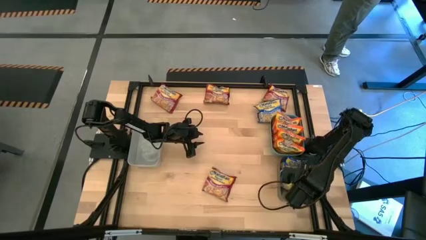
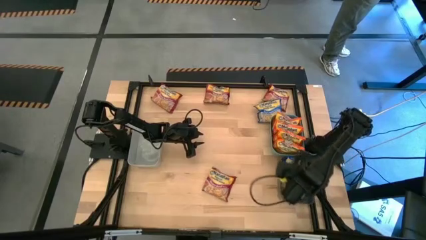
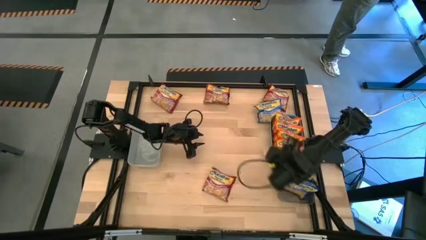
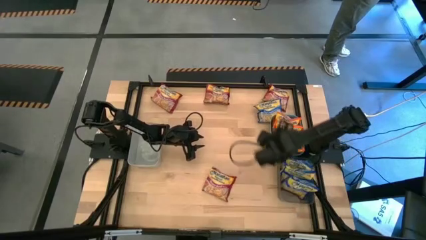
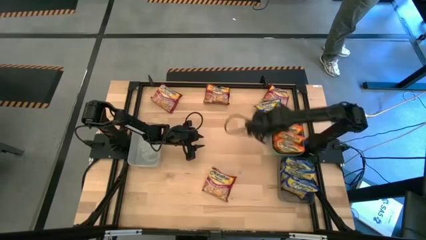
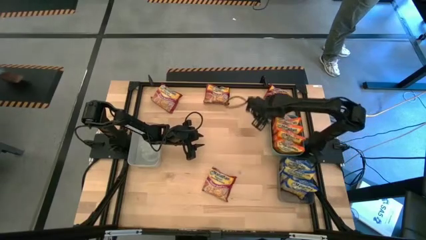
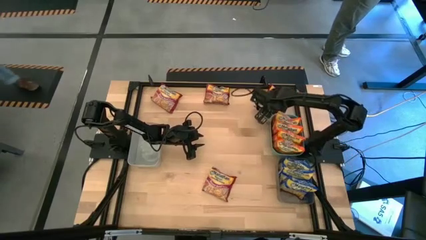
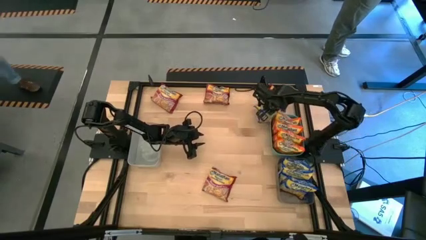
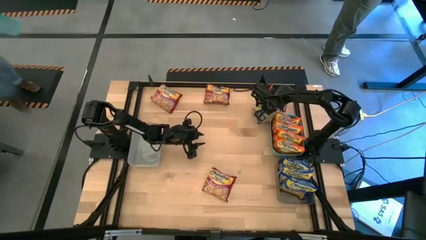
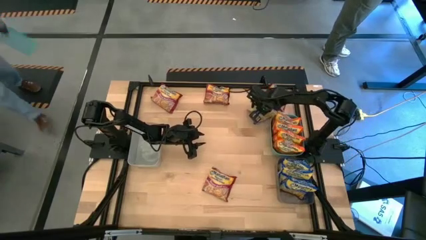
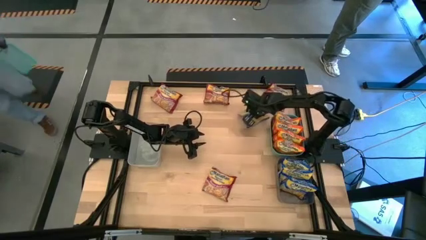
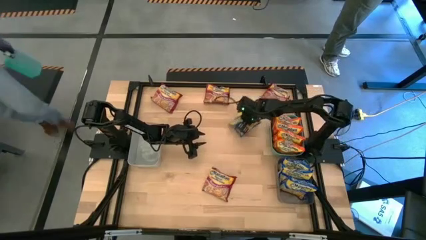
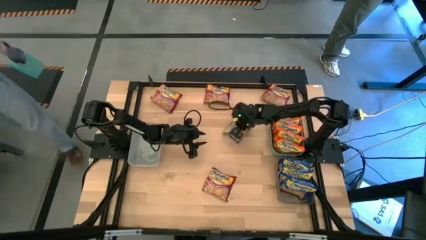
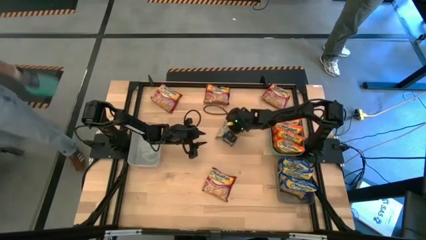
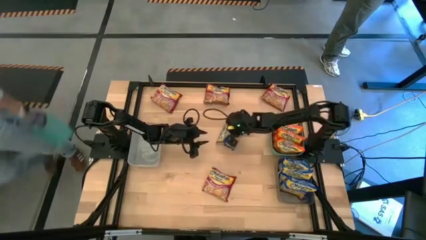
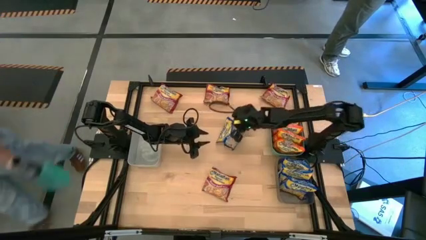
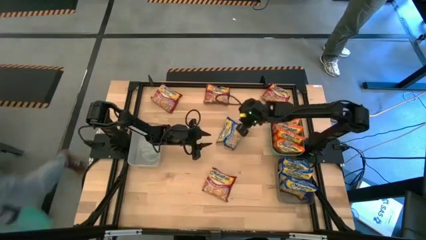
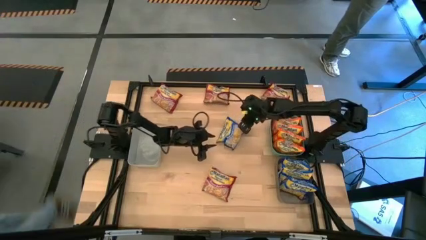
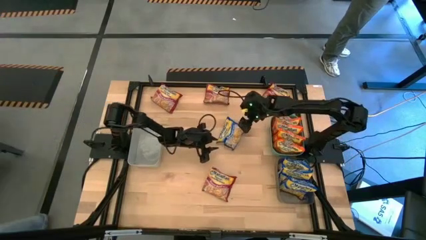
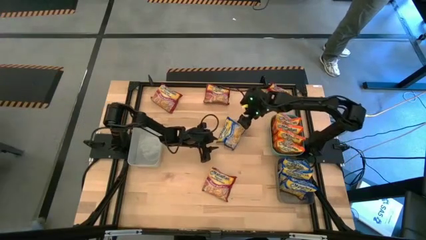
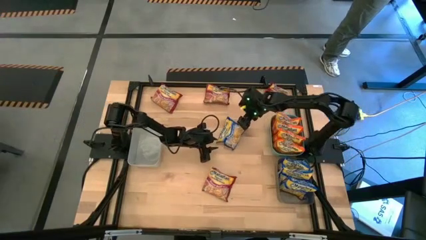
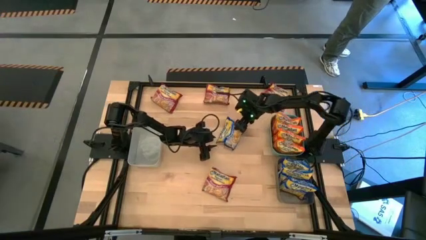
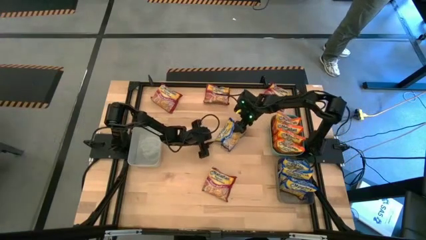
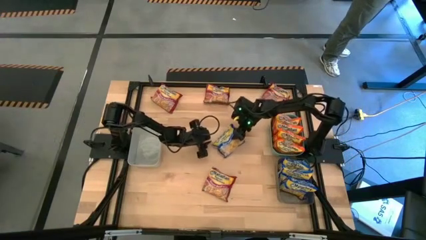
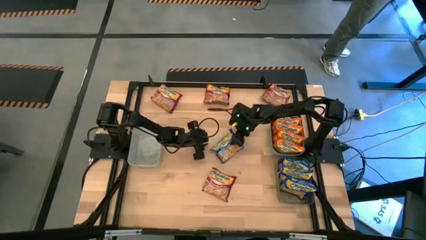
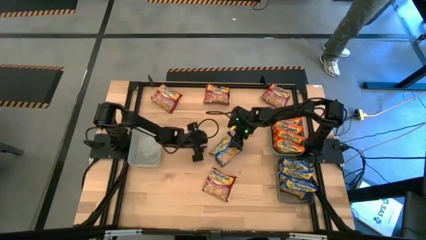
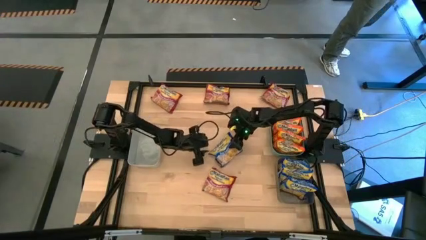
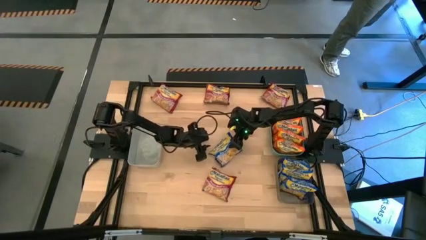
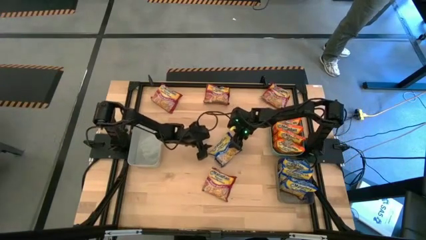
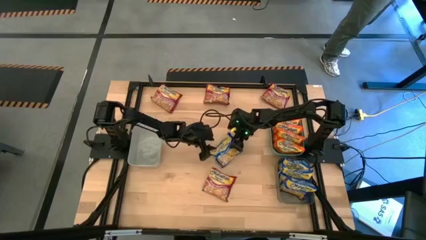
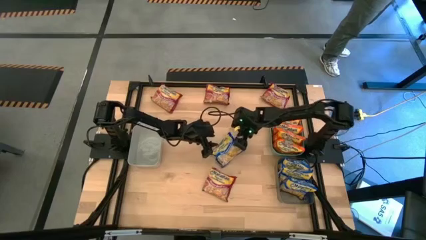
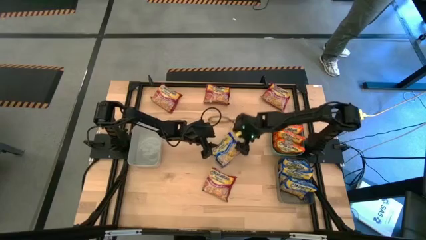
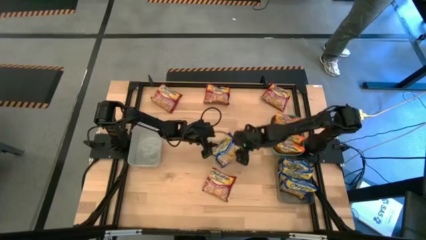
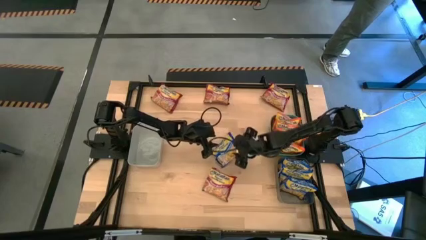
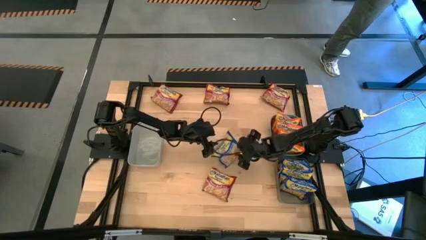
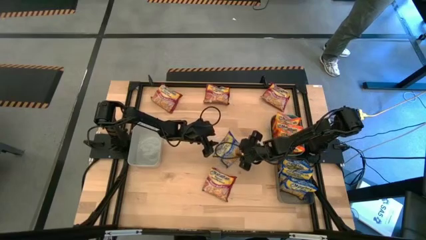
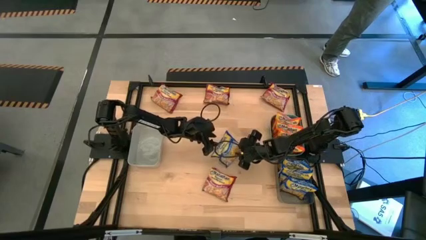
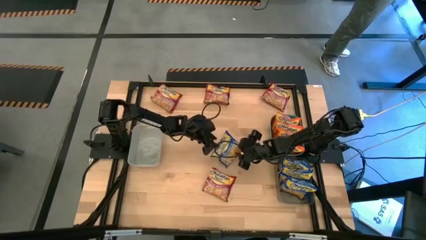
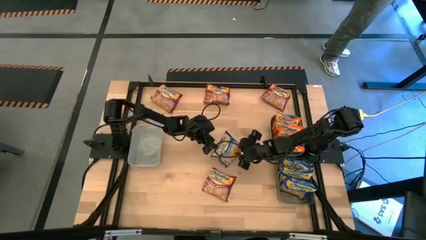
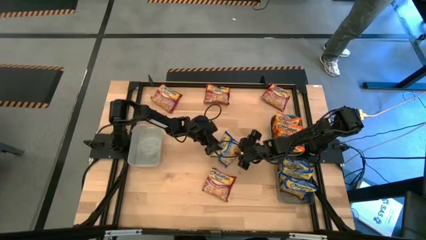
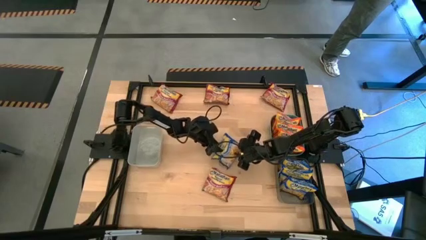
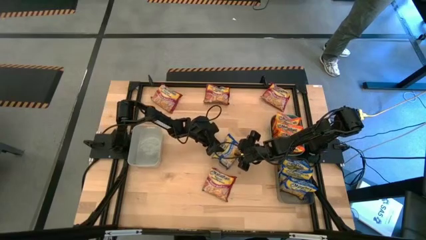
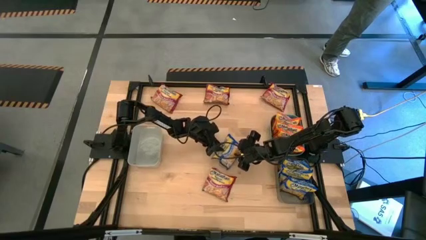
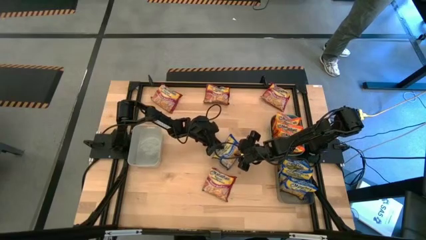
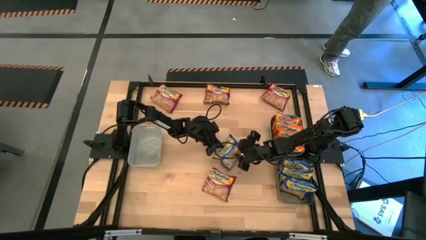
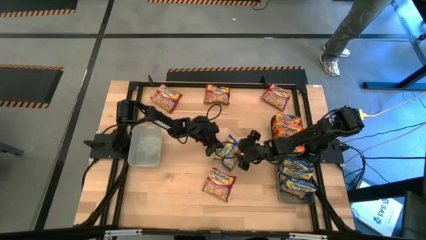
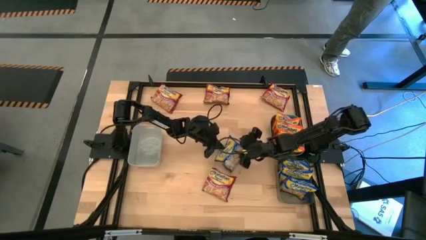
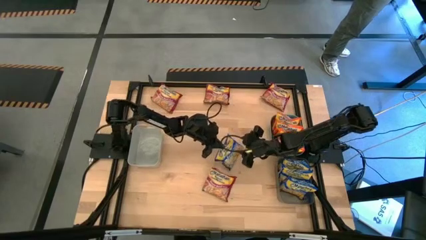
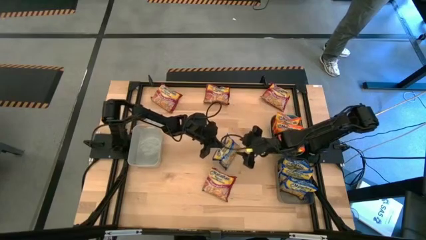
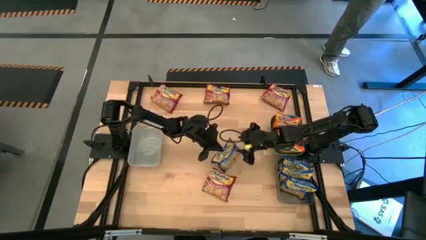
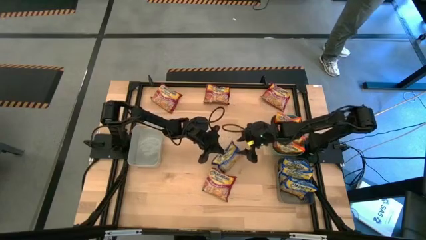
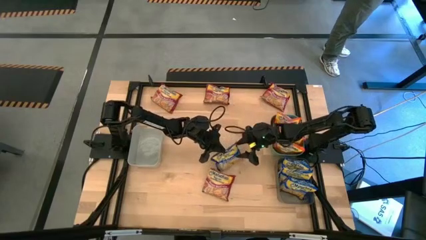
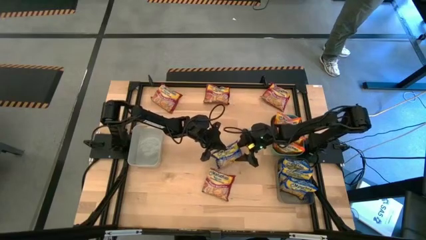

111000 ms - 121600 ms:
Task: Sort Maruchan noodles
Put the blue noodle pack into the black bin

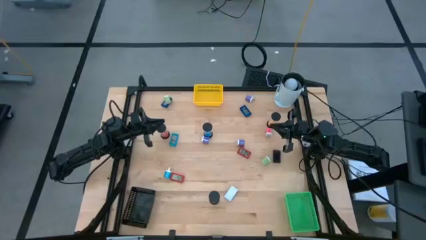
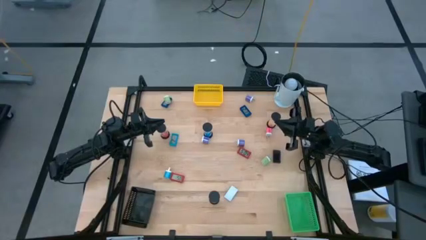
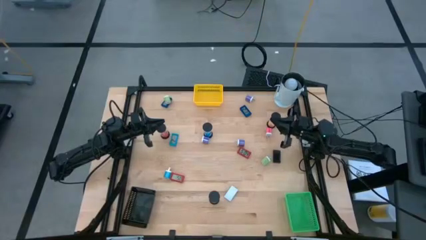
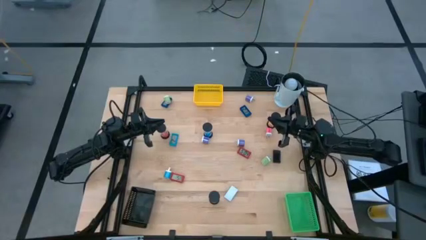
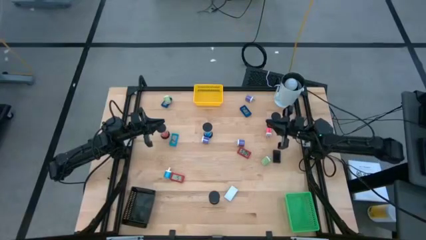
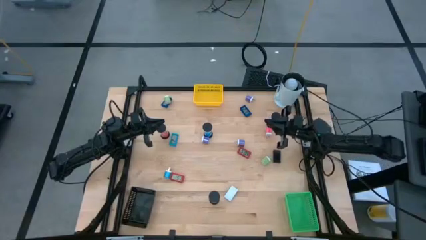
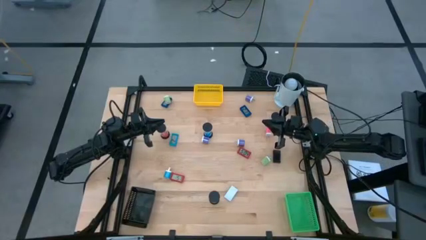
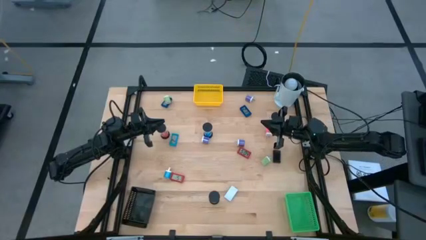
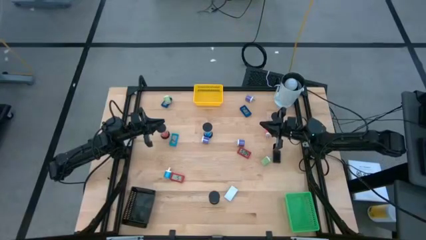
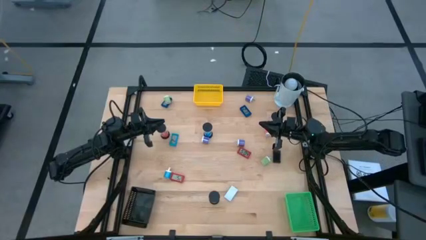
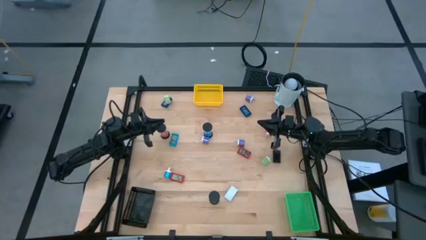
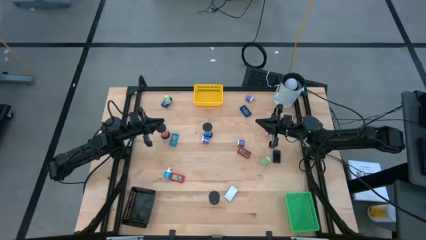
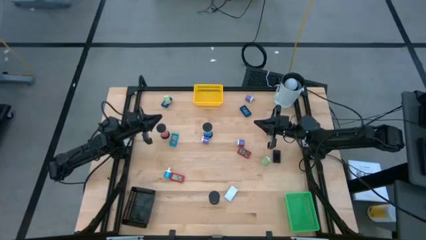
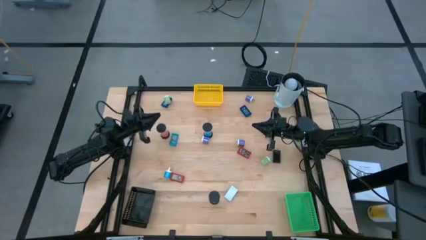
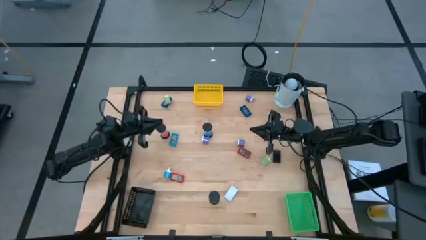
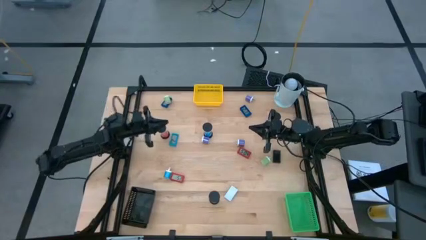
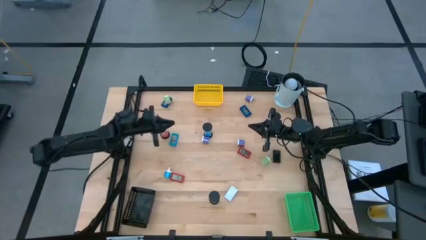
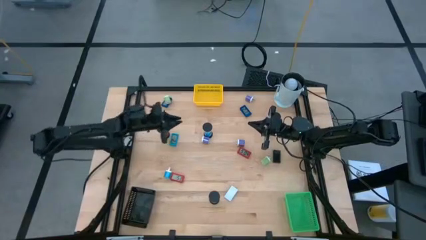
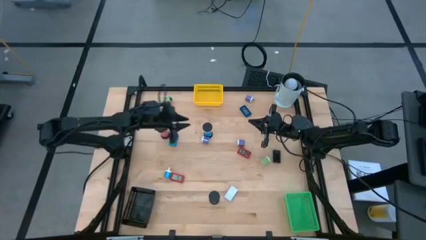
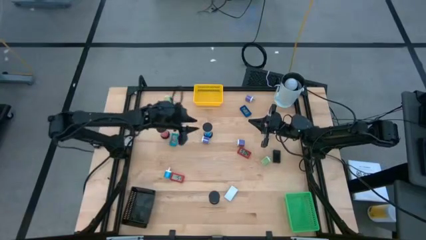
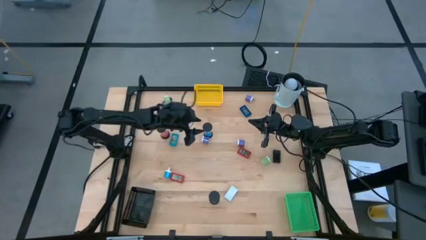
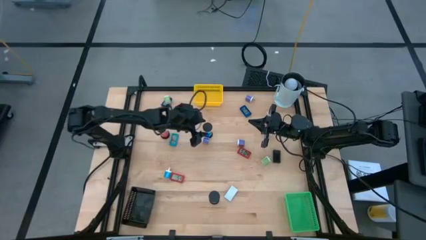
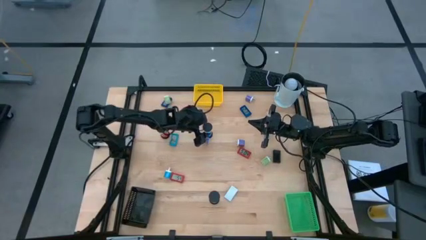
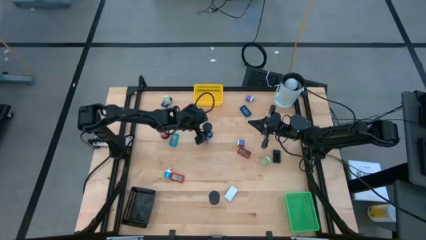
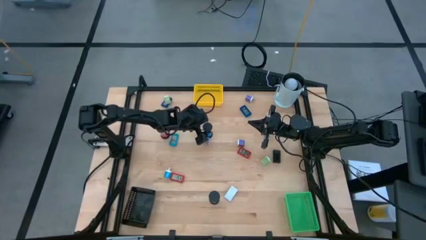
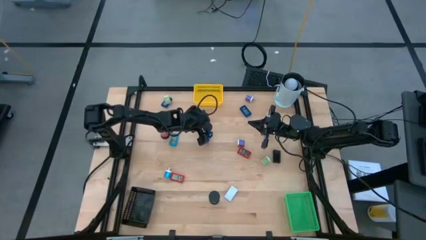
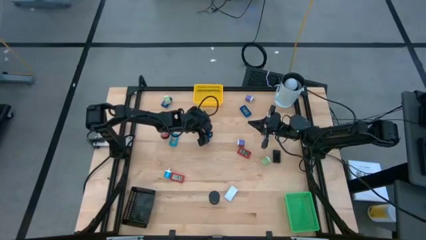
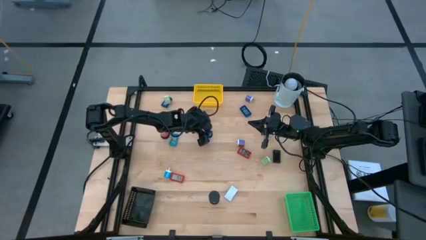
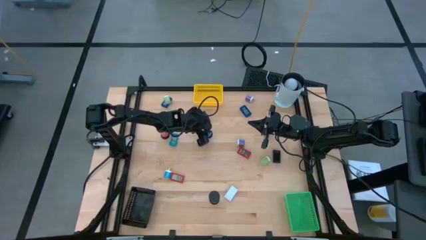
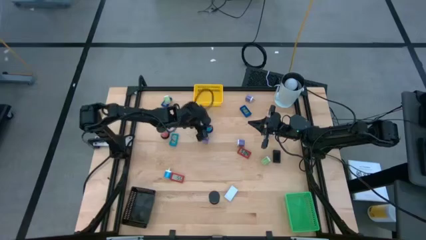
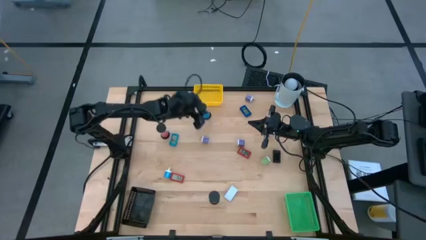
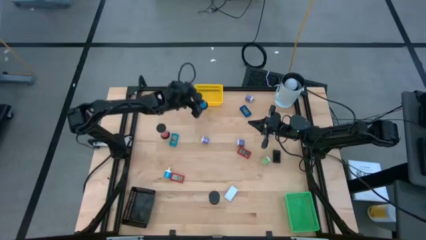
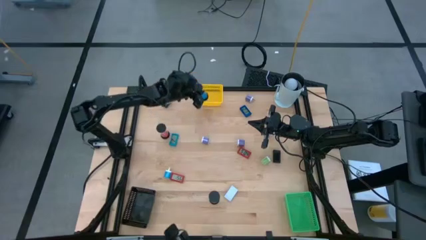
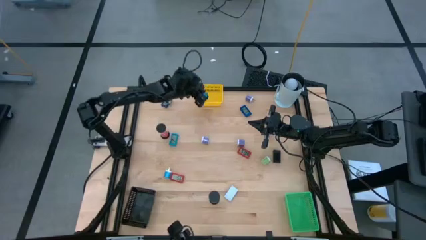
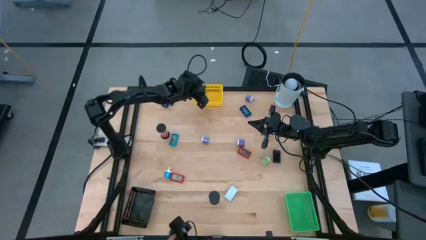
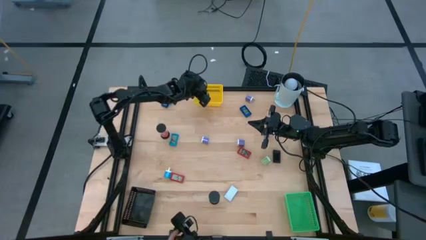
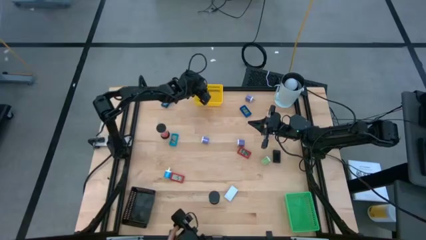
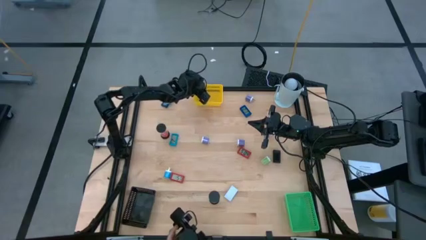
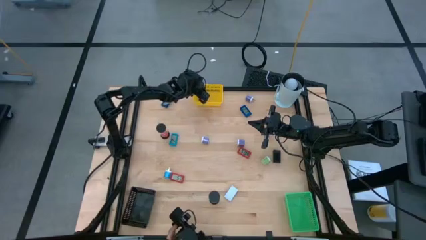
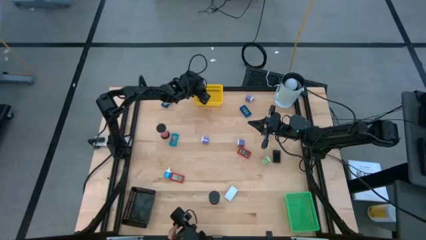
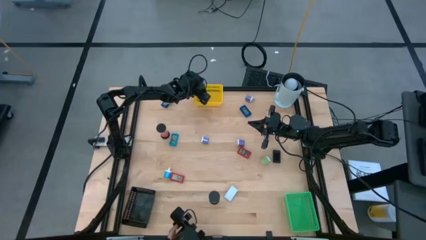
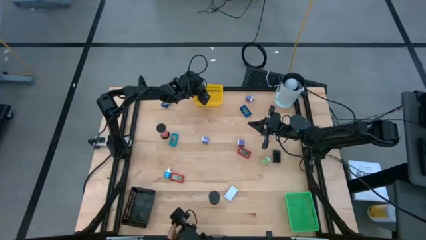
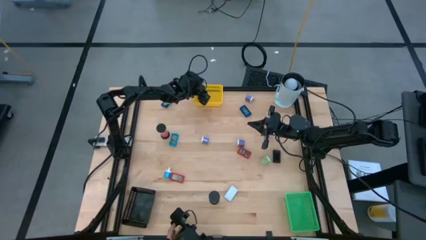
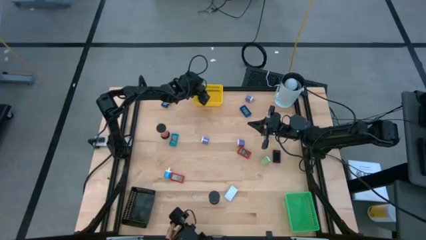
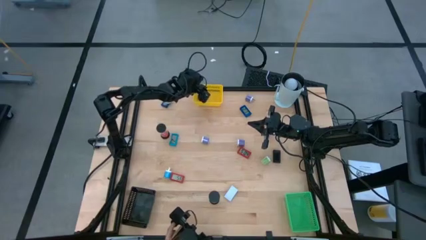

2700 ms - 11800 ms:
Task: Pick & Place Office items
Put the blue hour glass into the yellow bin
